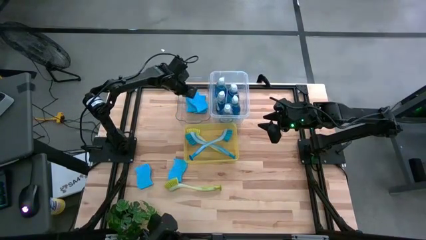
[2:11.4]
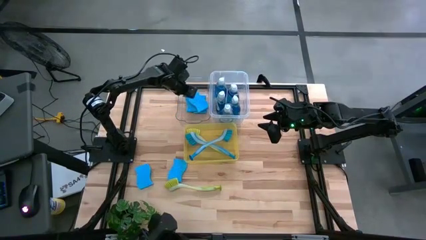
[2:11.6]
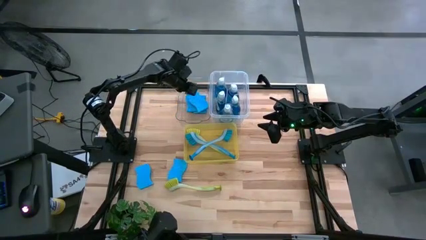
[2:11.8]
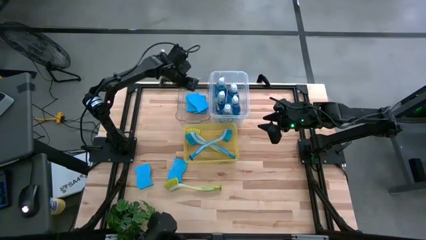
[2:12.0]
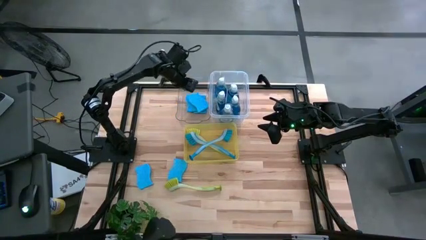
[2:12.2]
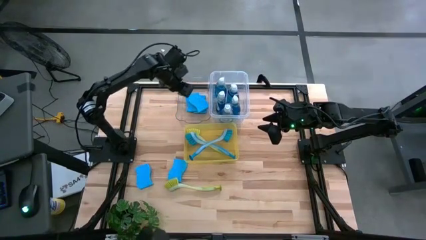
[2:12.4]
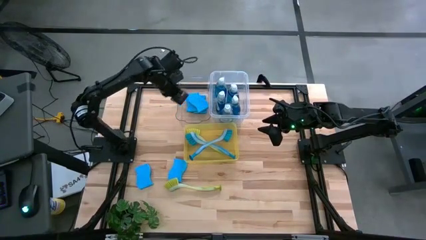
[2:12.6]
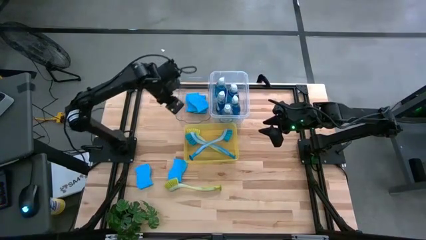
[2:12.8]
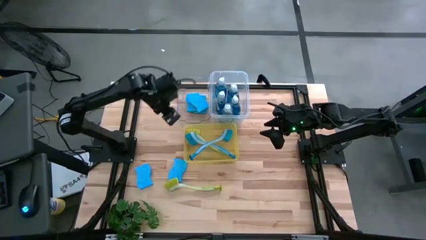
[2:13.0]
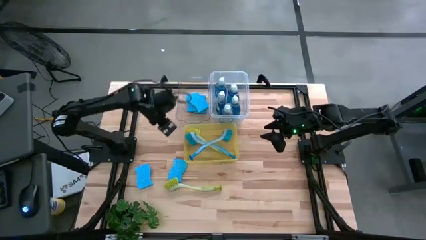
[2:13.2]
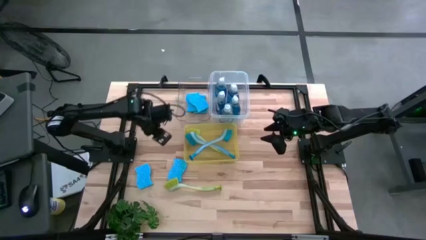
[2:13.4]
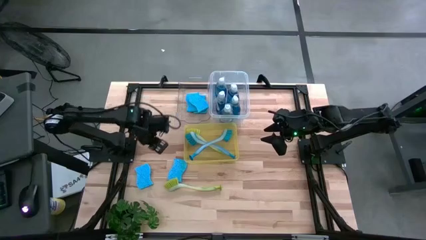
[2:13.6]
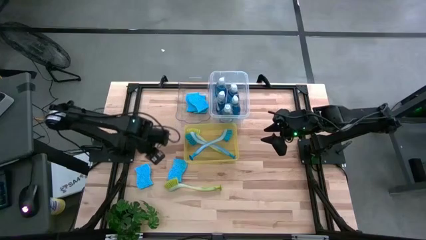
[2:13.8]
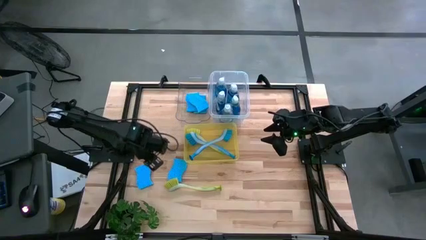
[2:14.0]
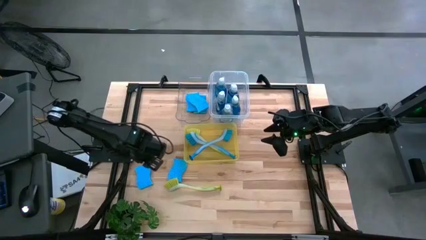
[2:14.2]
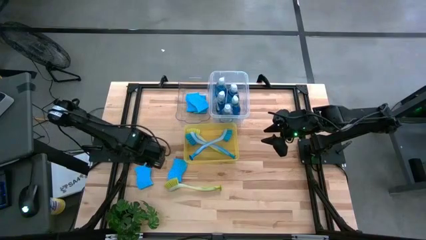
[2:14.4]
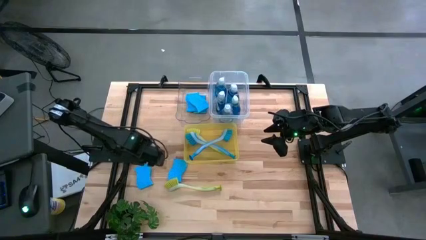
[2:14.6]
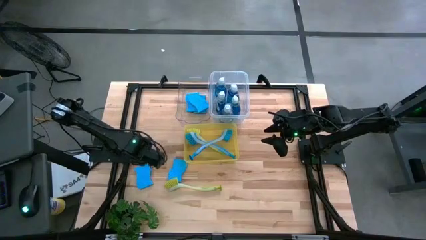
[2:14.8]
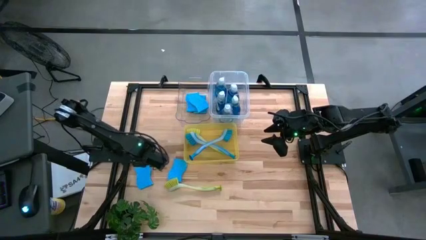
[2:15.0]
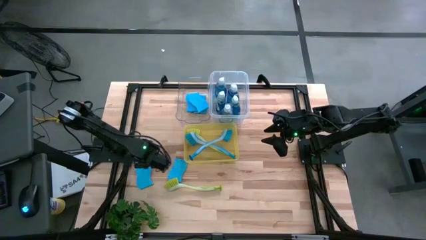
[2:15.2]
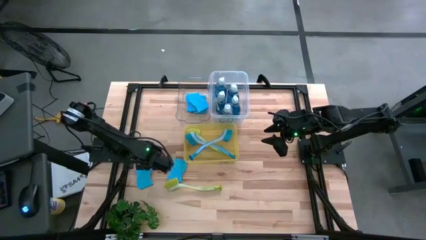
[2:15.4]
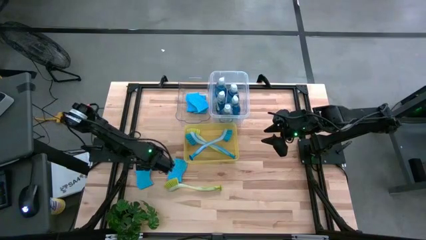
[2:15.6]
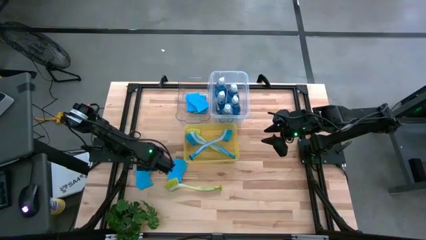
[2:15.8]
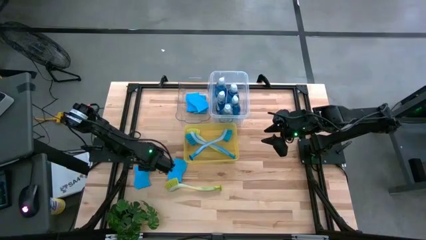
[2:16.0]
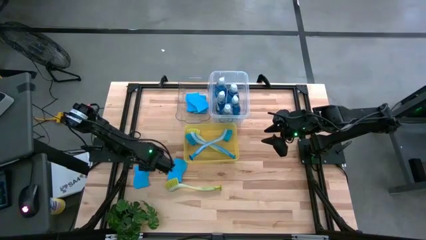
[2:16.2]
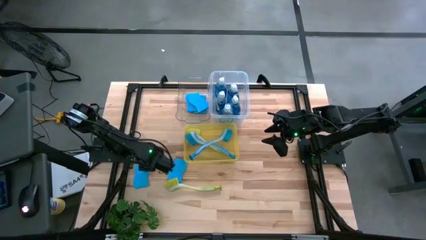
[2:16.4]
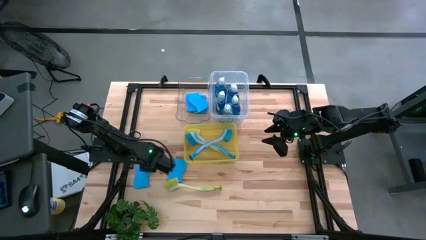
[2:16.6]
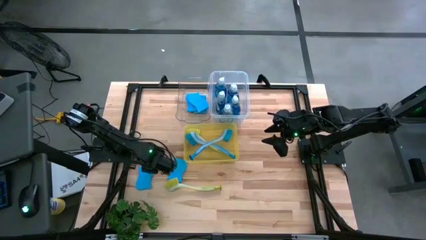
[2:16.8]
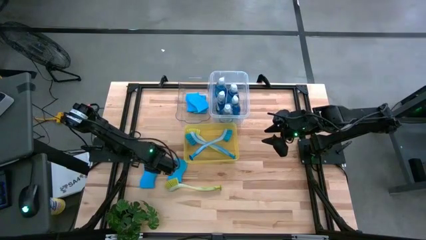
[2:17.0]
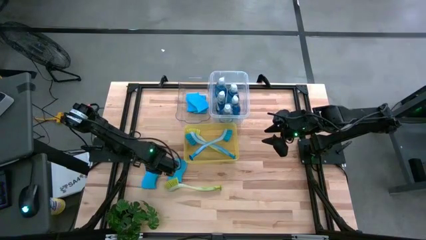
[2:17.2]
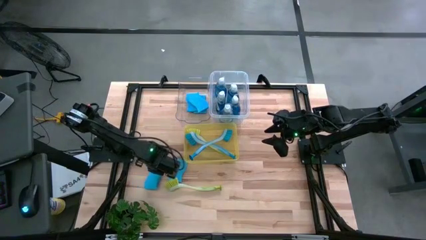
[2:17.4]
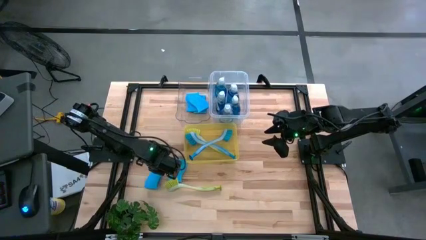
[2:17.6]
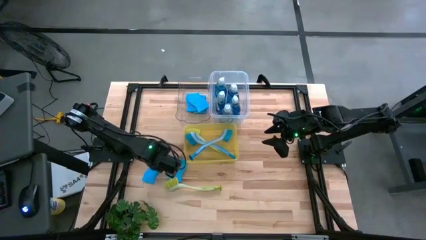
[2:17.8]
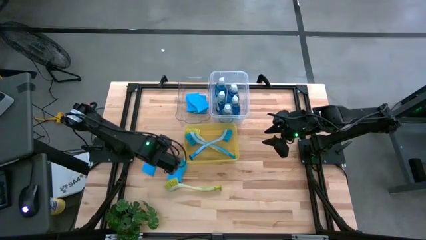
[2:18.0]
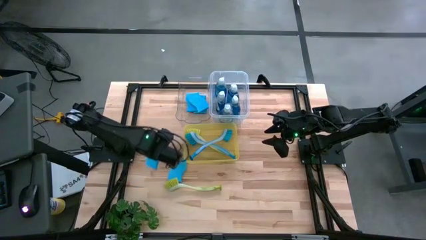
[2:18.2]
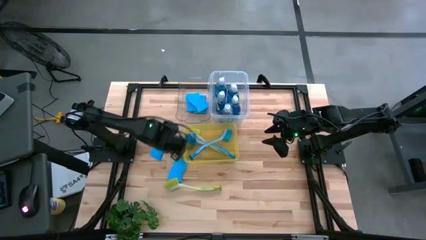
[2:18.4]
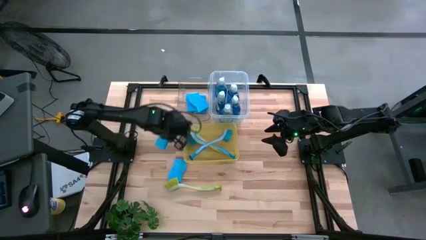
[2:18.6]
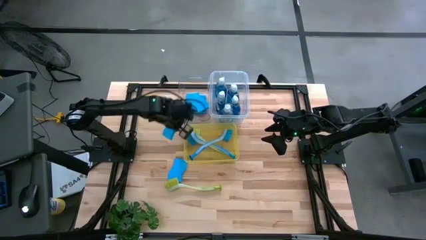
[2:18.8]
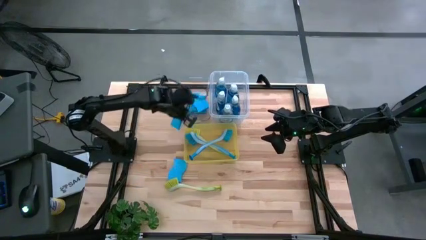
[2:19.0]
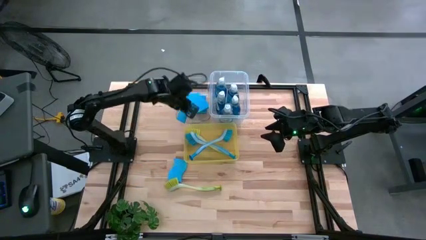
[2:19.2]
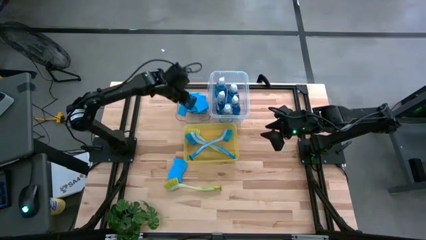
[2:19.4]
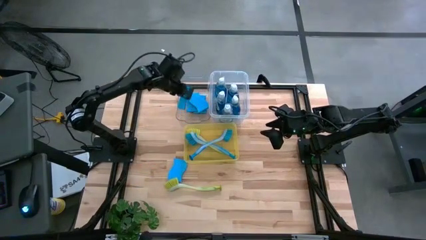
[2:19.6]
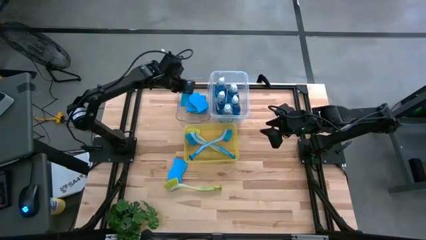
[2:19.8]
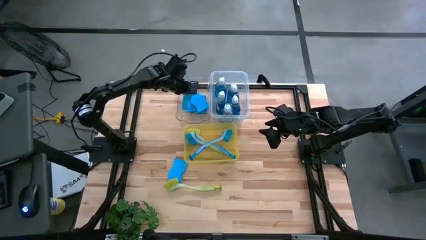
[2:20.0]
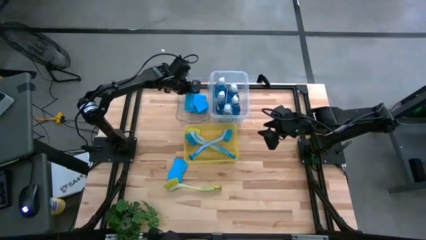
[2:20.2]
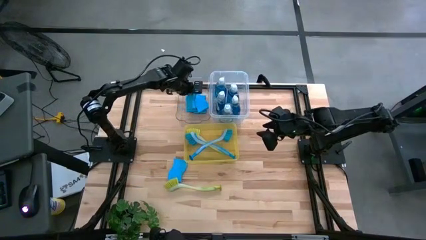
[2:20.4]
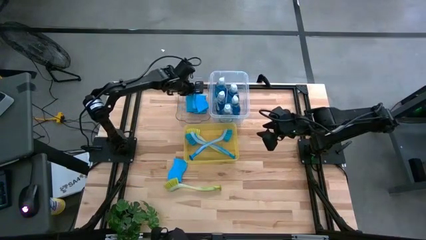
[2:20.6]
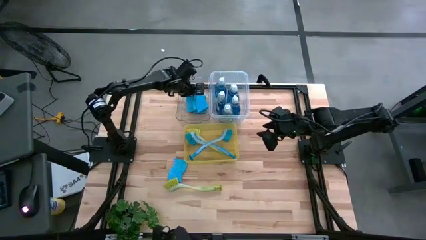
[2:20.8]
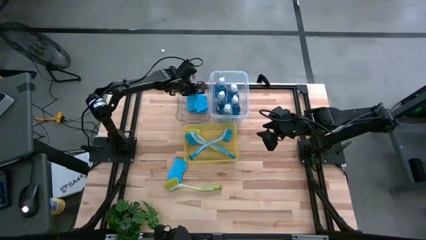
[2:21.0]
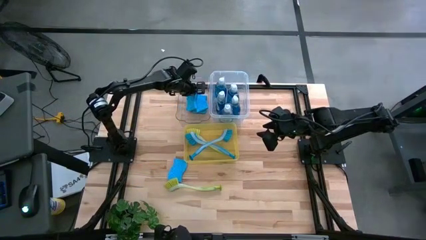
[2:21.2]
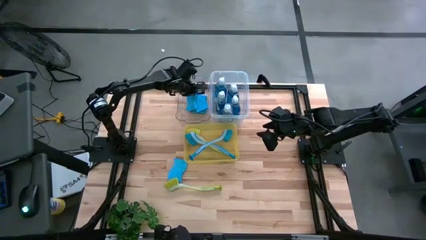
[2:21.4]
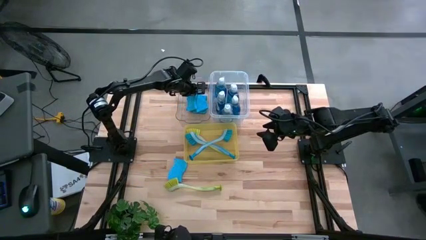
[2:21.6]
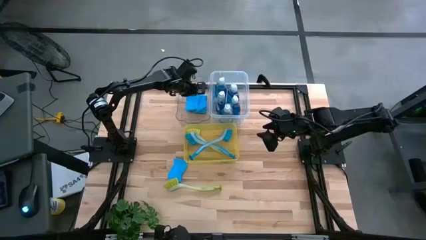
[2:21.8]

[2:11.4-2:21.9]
Task: Pick & Place Kitchen Sink Supplies
Put the blue sponge into the transparent bin
